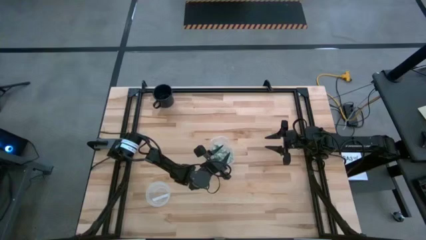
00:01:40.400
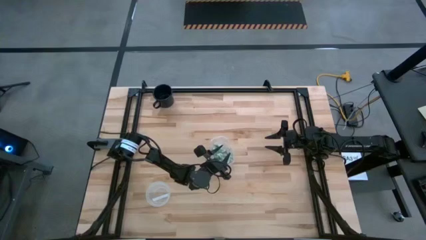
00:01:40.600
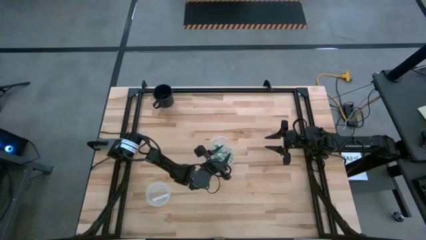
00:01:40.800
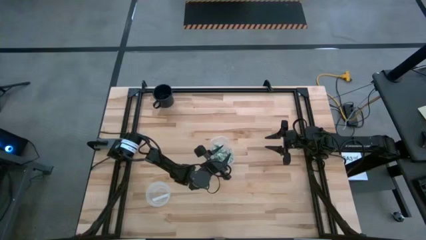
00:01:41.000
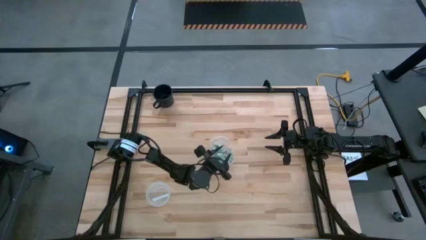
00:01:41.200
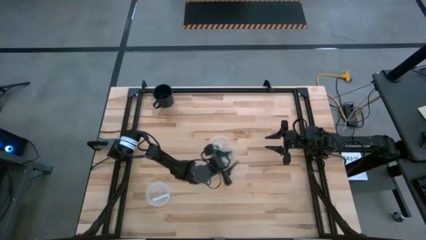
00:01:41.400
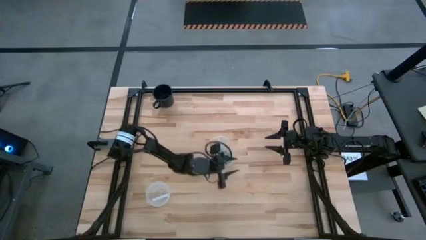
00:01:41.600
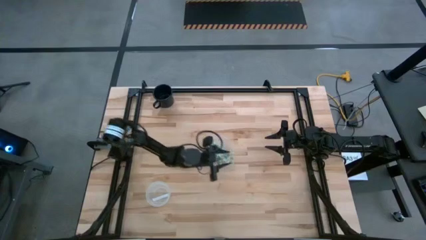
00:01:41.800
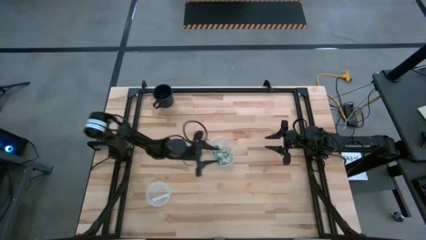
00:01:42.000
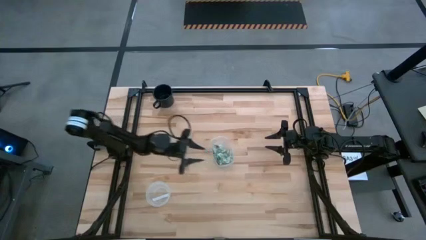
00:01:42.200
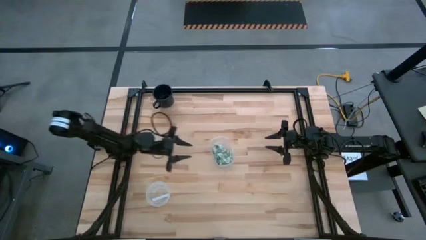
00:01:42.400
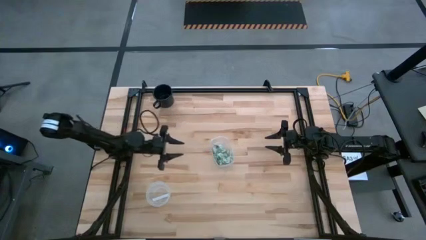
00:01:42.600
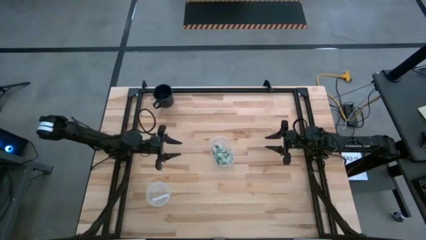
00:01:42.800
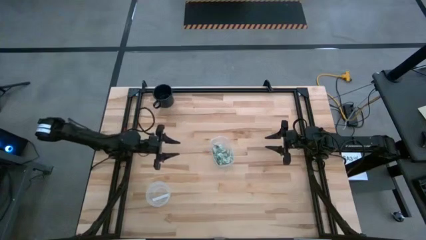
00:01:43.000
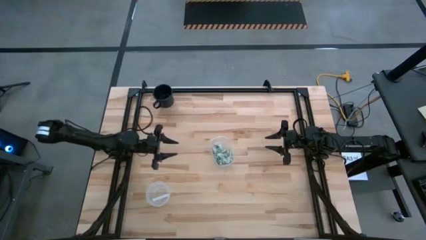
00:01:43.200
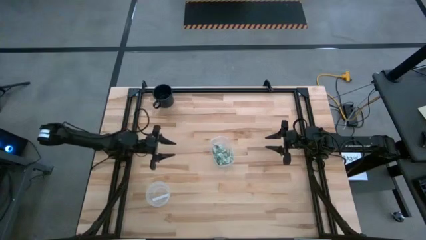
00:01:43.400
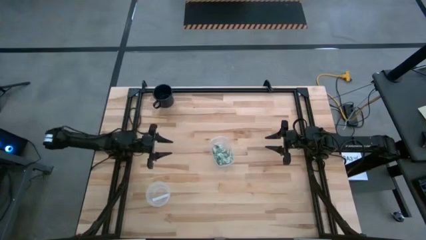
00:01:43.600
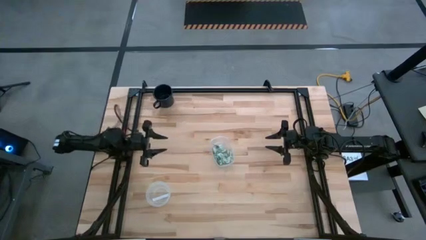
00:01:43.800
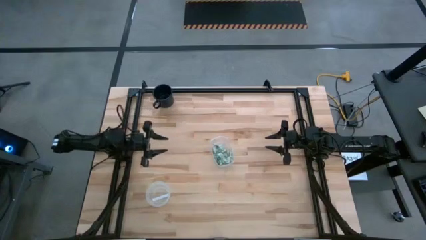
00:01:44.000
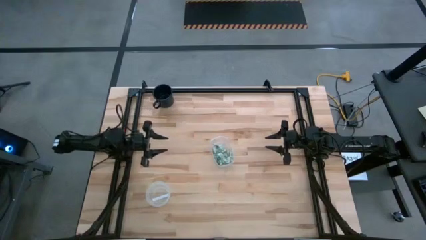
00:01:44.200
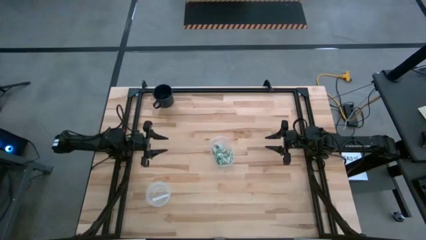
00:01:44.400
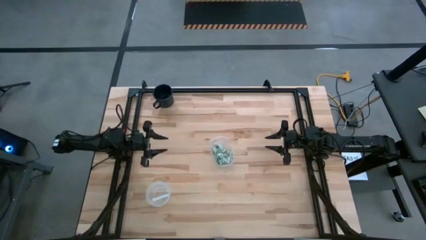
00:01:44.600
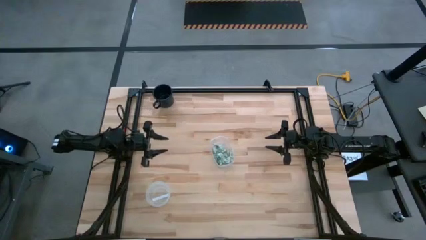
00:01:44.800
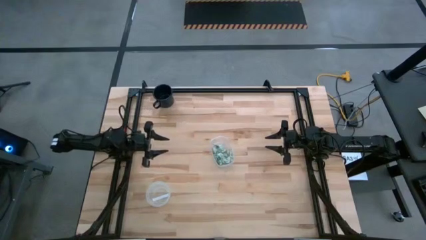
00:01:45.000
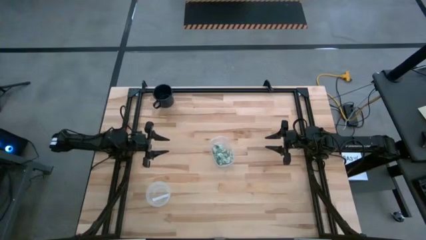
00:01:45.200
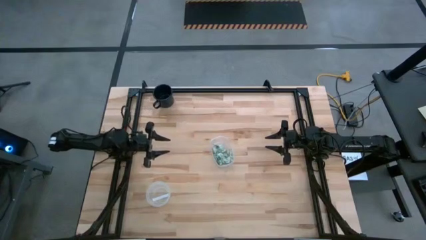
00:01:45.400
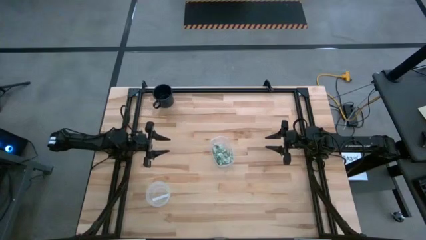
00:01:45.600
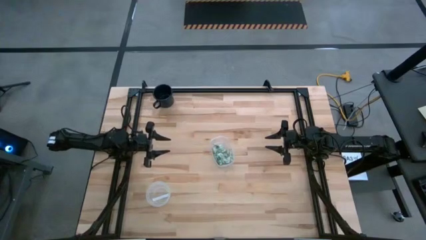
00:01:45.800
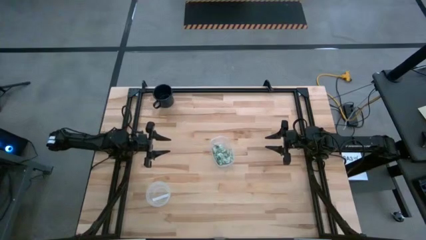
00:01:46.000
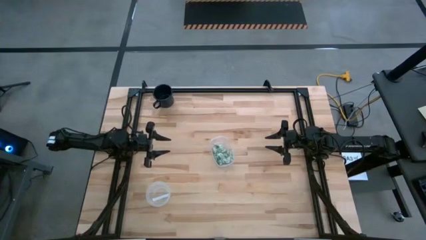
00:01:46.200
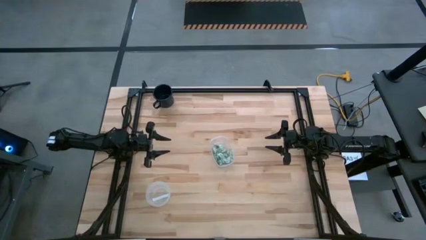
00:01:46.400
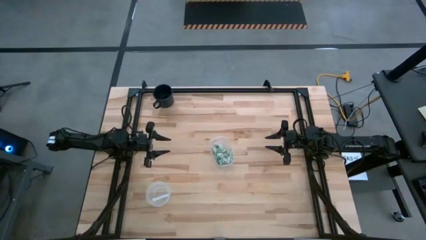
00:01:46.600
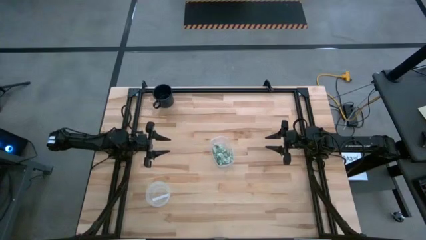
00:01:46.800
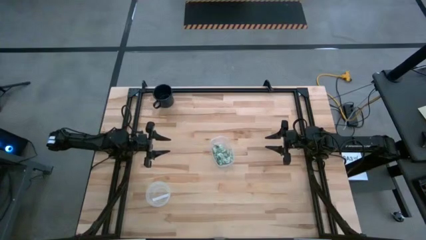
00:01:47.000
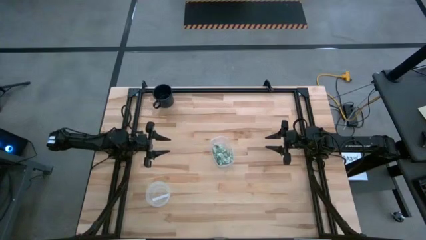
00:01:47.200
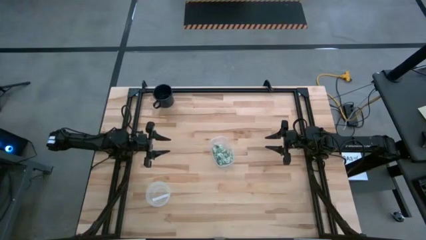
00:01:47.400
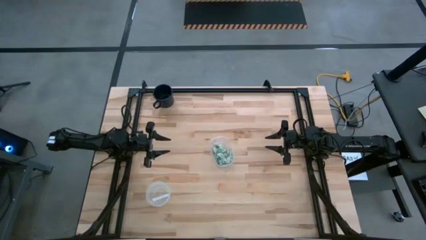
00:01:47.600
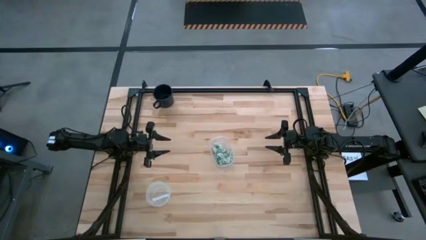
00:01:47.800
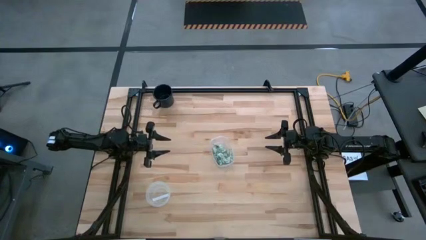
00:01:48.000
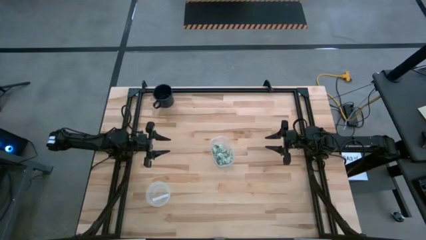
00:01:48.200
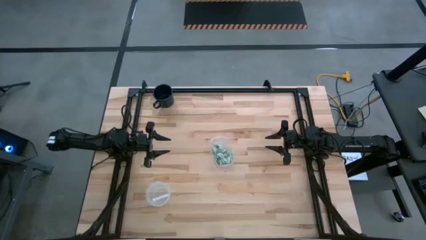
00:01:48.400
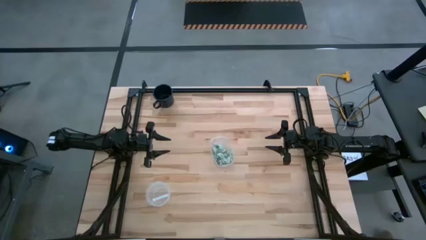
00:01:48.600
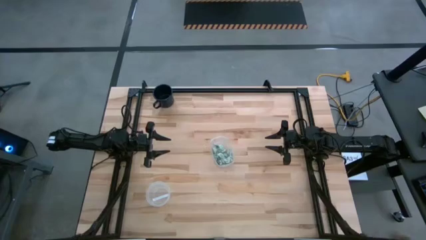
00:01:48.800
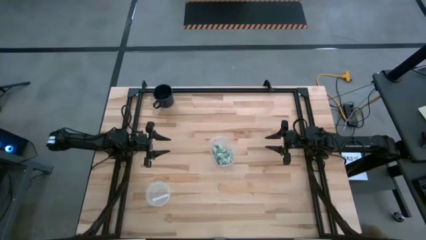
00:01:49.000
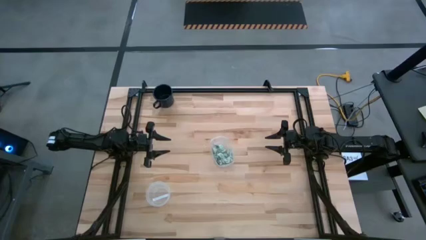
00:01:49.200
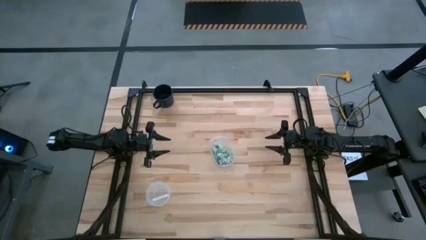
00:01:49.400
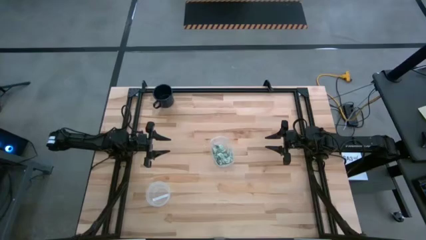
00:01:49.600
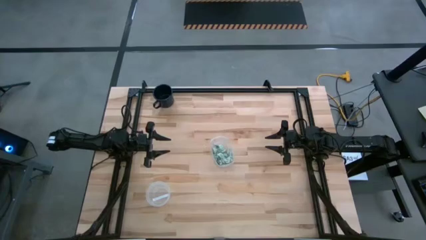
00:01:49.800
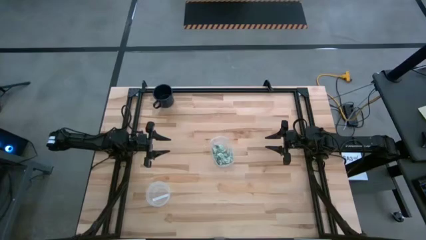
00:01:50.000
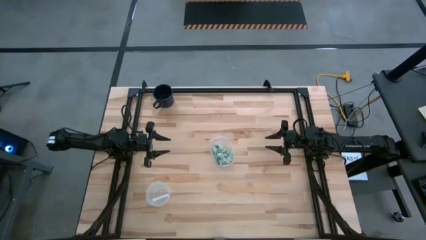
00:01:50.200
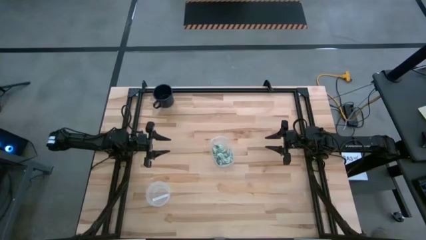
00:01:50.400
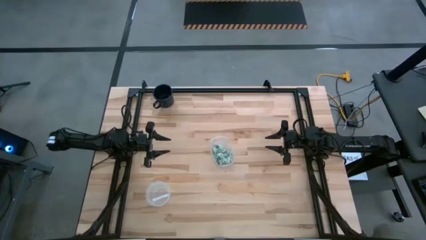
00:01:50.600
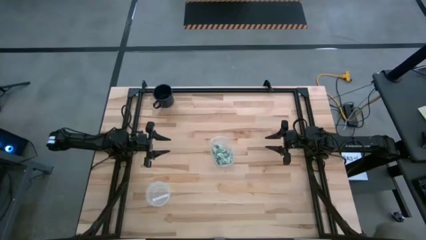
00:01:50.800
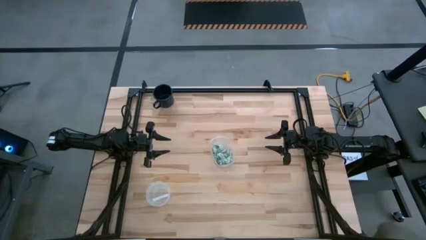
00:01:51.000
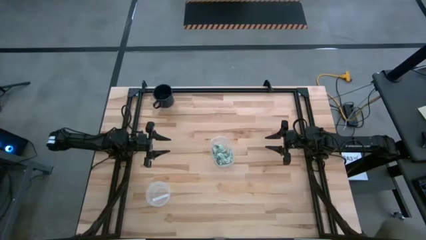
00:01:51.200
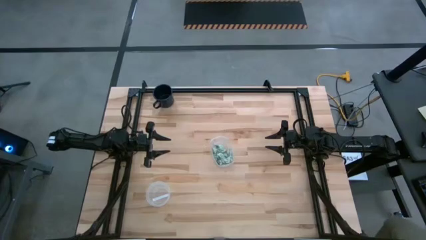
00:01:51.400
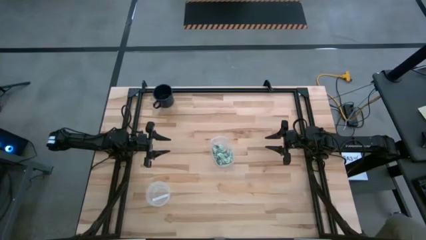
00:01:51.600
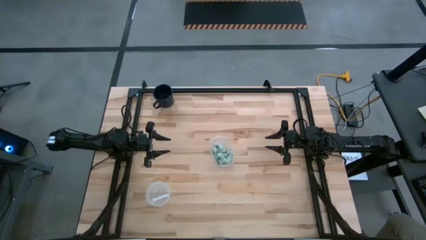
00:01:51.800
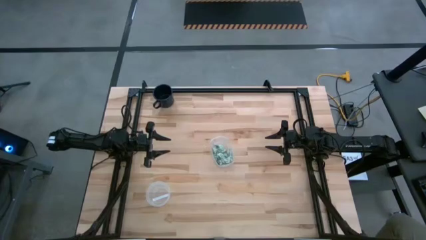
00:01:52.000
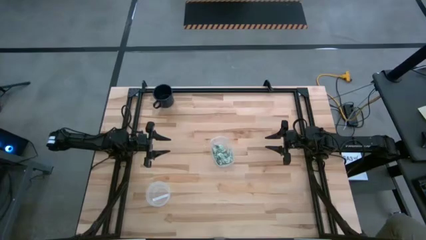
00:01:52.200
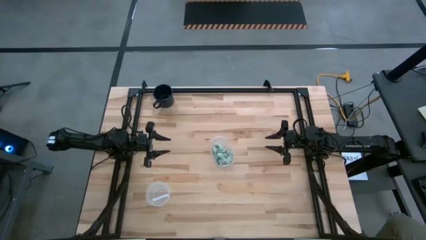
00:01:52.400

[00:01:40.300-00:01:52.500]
Task: Pick and place items into bin
Return to Home Position
